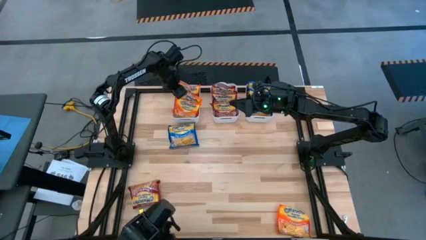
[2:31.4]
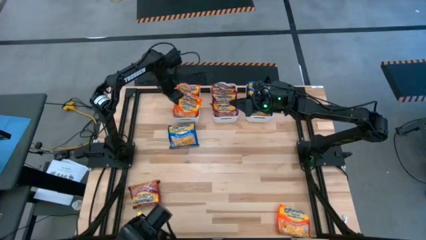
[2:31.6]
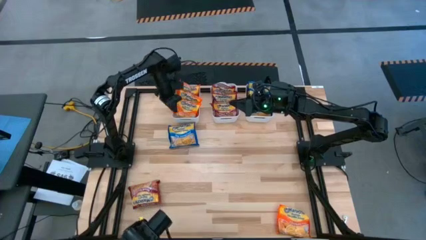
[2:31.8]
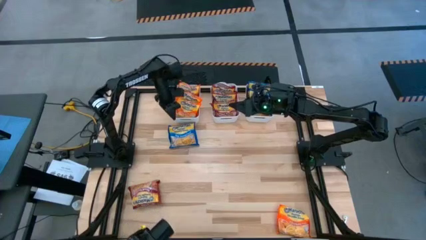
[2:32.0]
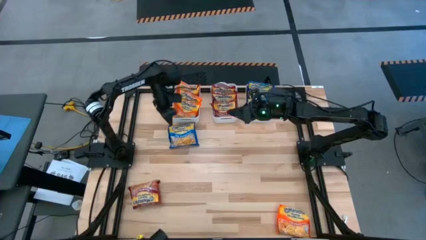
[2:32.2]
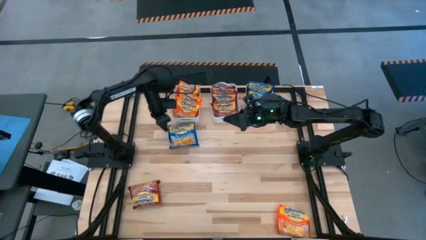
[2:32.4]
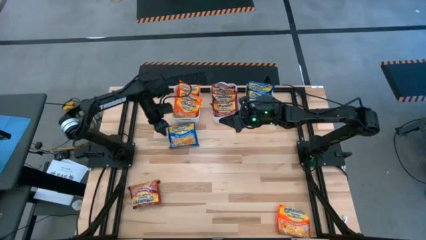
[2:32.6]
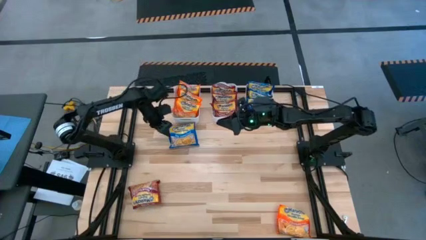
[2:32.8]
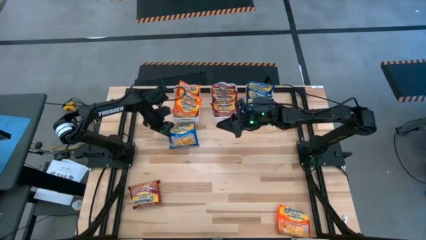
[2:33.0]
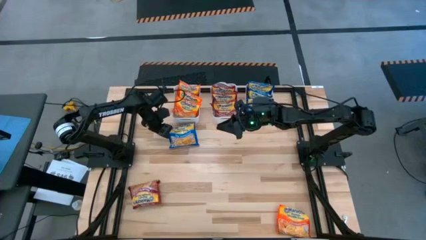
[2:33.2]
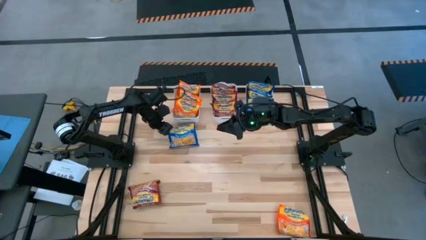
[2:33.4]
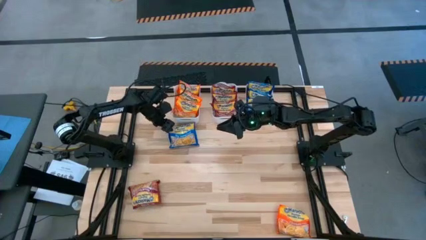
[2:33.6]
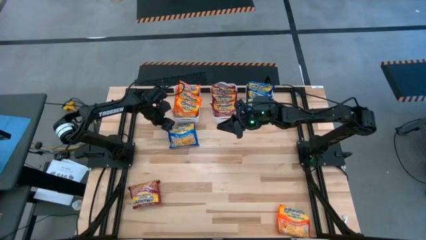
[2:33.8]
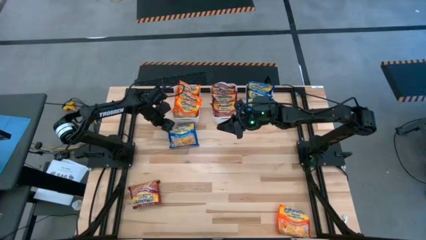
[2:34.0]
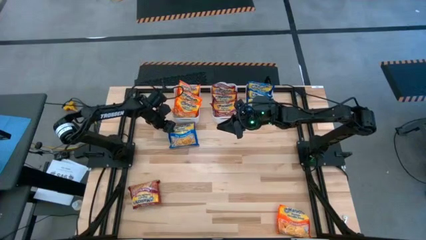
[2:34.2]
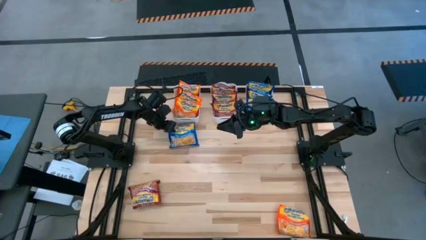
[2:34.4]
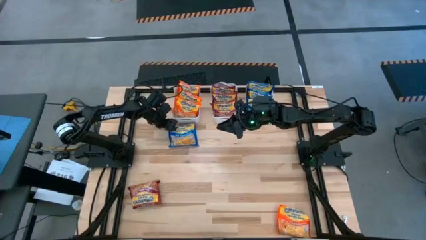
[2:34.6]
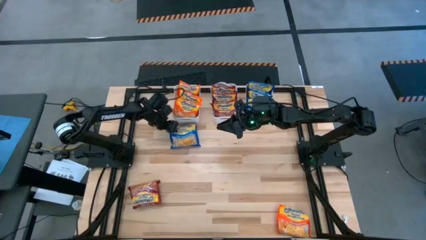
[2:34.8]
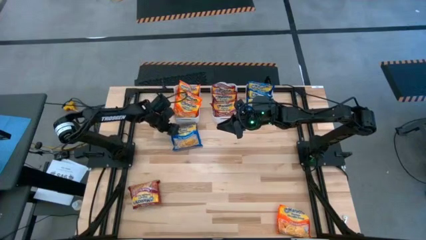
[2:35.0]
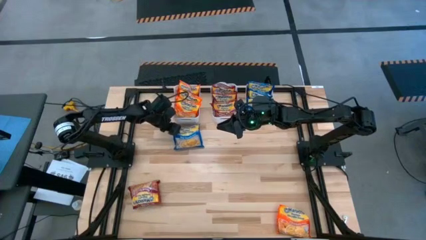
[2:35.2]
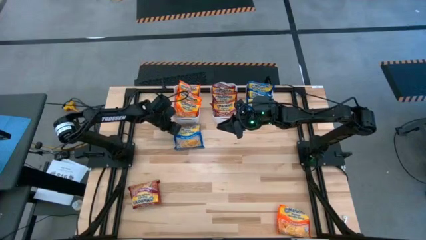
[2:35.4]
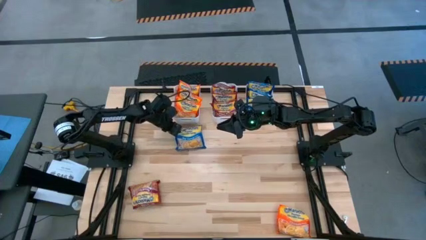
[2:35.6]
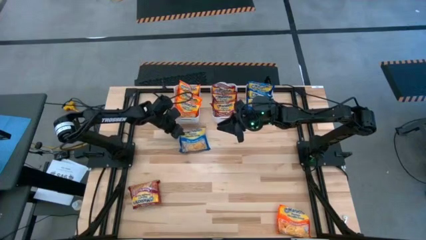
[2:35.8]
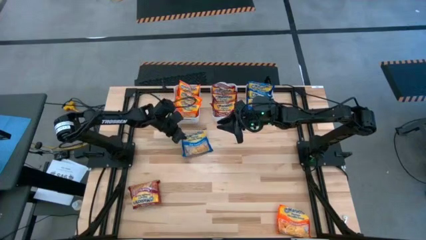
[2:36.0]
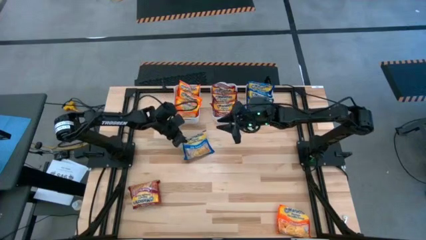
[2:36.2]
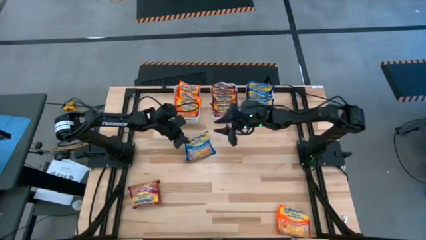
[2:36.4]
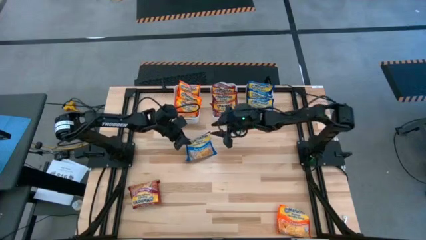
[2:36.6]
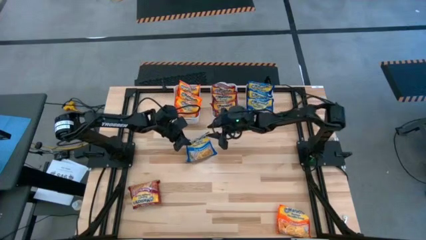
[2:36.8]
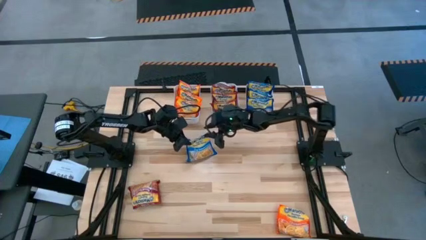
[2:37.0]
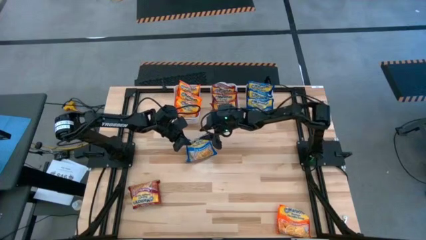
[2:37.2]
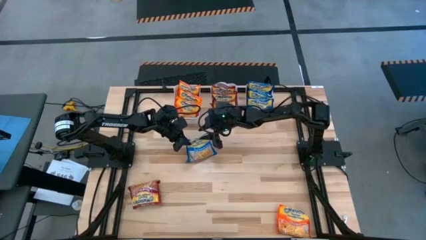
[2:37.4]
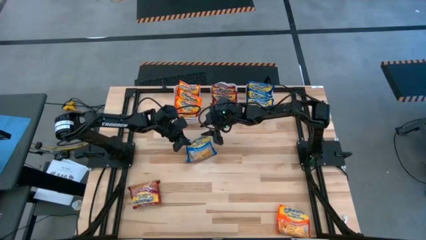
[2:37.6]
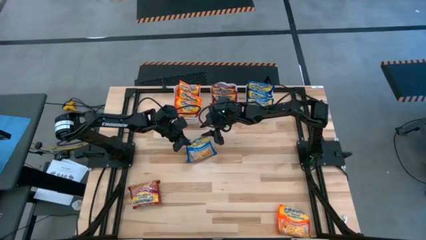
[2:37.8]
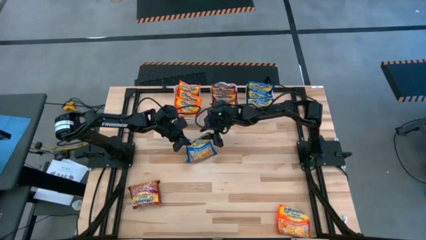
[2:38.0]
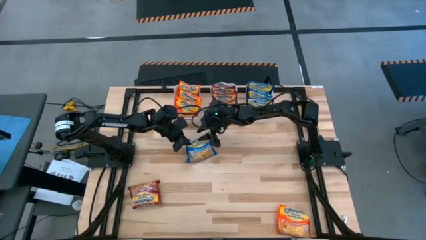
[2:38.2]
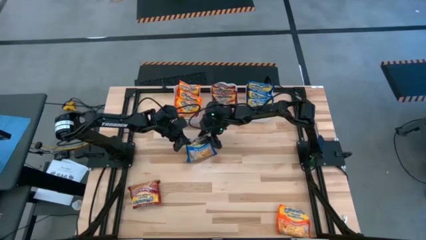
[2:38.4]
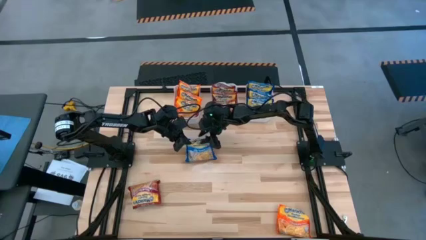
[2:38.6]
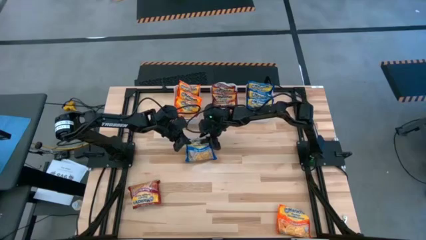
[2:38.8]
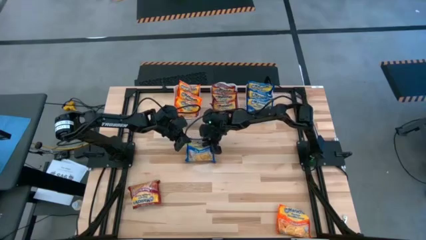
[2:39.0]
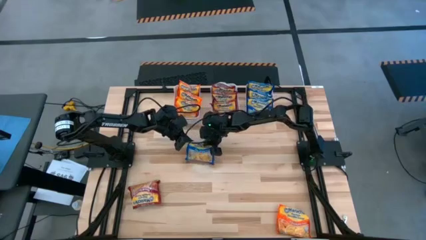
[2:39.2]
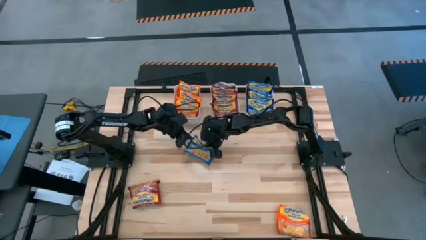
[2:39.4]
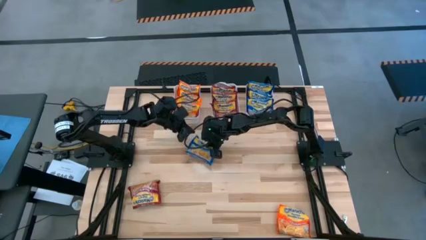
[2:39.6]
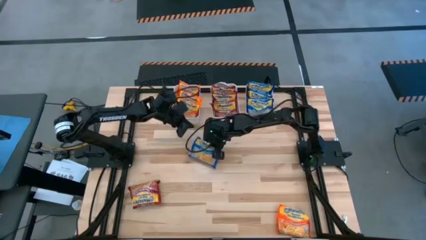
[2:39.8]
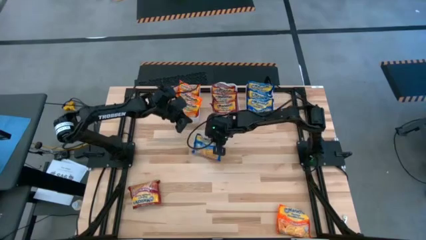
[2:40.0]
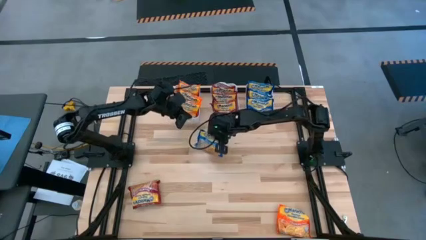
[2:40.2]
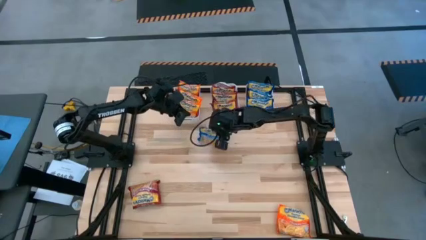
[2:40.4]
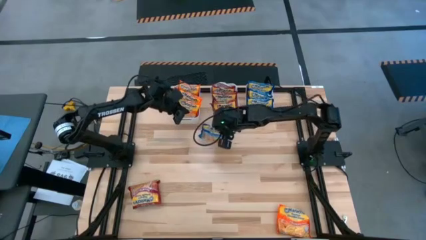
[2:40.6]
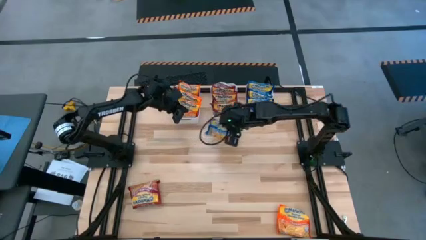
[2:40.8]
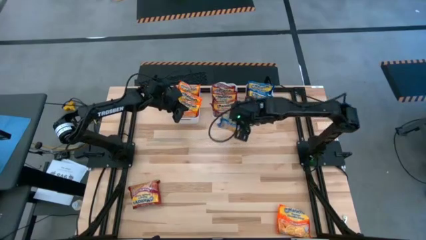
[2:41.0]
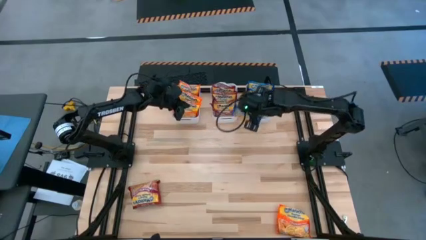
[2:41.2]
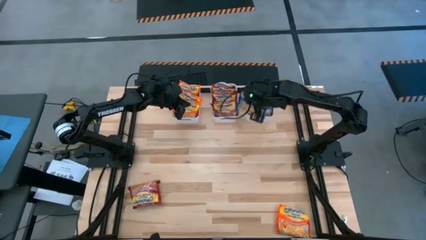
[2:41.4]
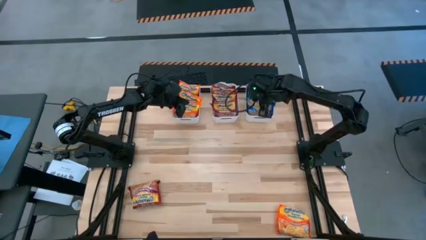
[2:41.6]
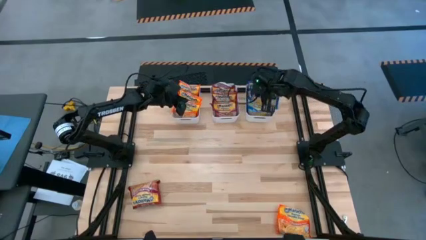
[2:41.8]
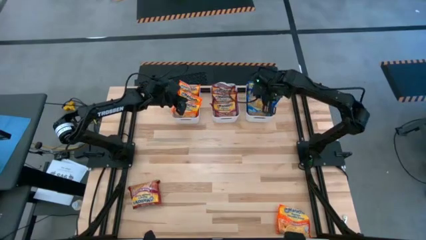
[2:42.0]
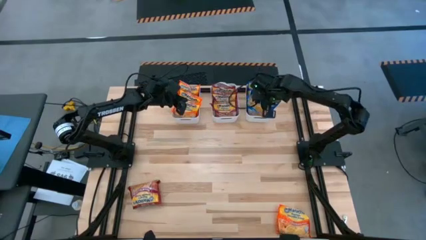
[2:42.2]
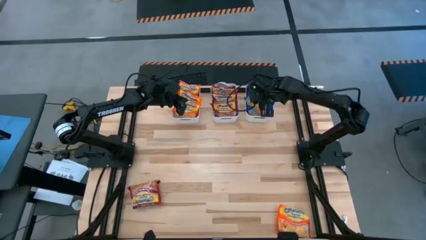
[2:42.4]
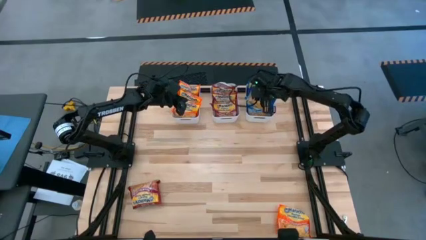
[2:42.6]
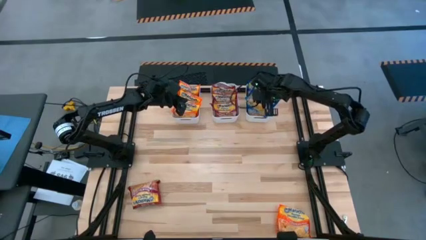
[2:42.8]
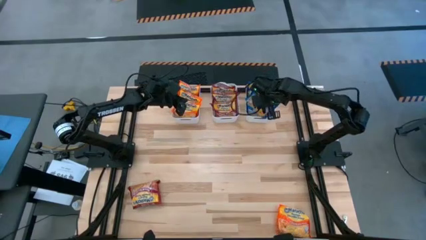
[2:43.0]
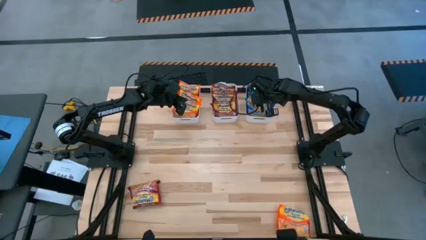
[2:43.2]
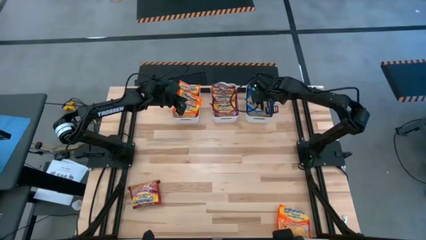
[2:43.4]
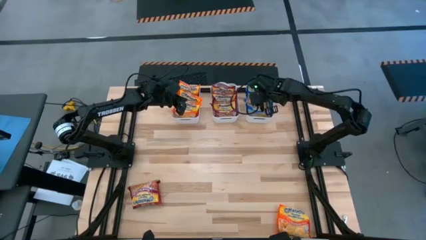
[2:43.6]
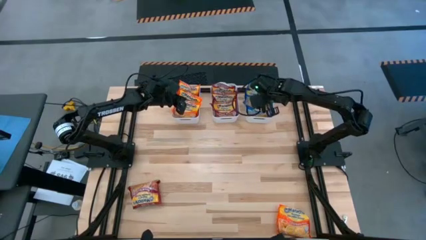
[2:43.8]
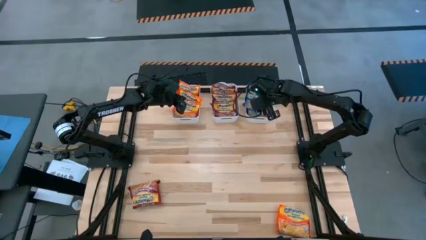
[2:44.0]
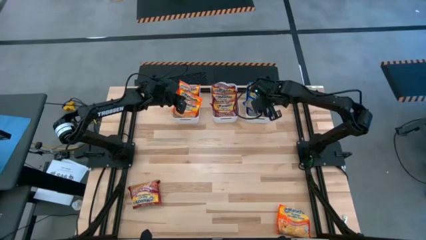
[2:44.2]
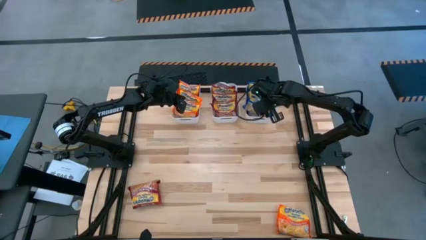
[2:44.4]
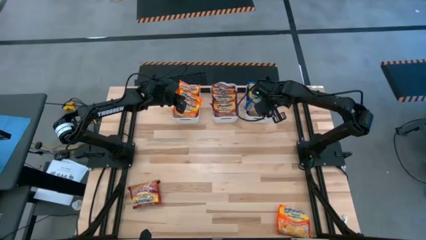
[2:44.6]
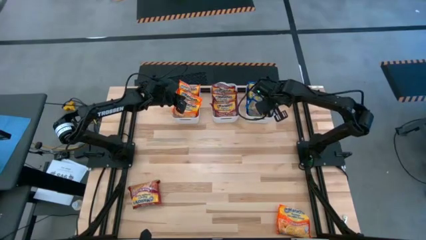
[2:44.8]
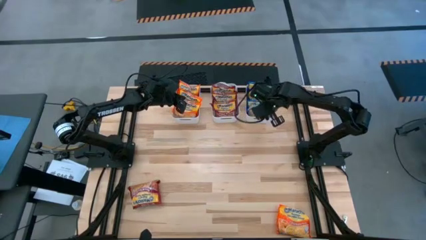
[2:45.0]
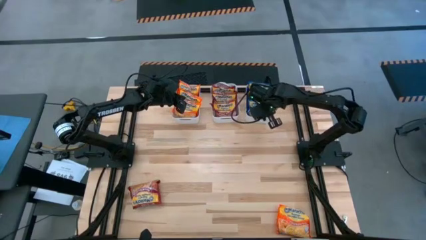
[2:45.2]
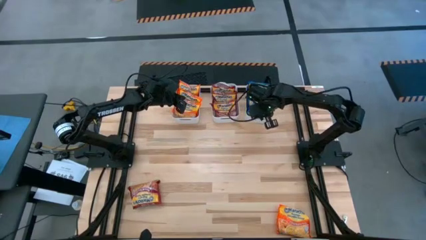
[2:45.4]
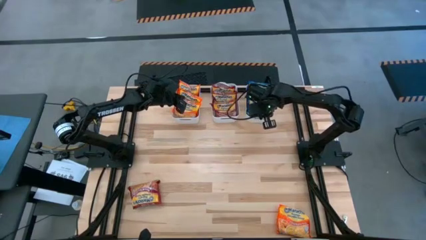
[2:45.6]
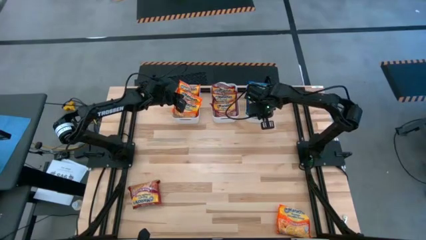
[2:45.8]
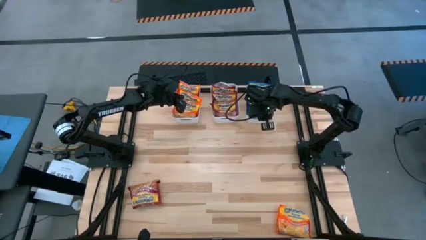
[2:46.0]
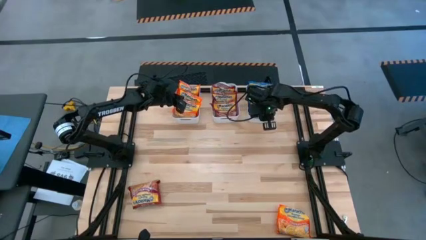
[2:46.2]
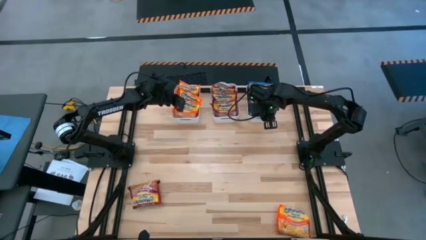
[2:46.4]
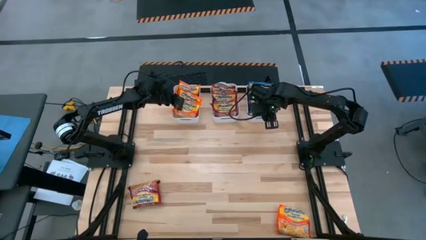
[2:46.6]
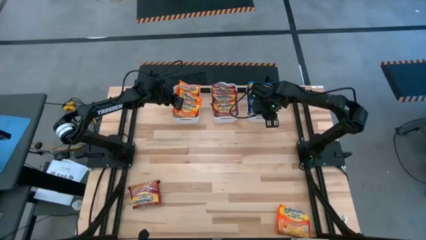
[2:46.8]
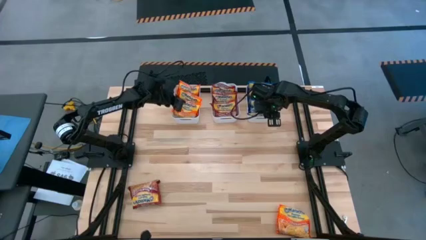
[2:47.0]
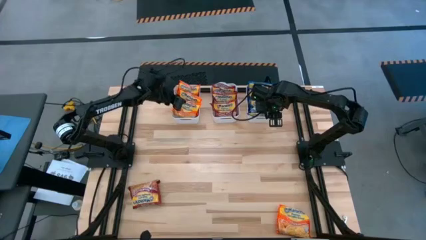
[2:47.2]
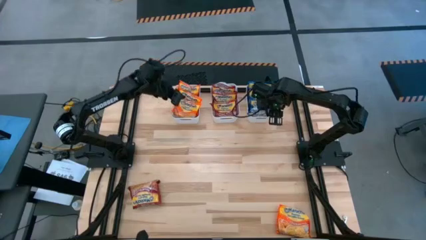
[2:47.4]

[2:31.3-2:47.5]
Task: Sort Maruchan noodles
Put the blue noodle pack into the right white bin

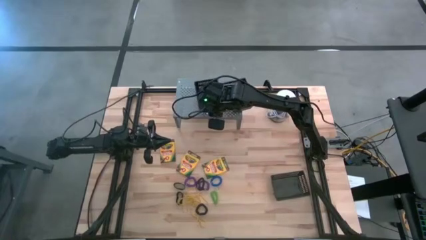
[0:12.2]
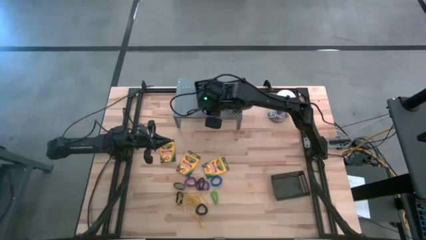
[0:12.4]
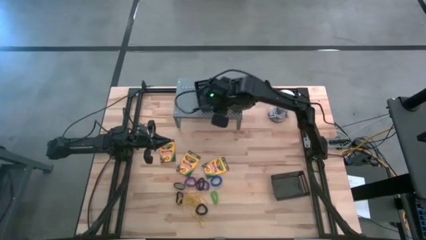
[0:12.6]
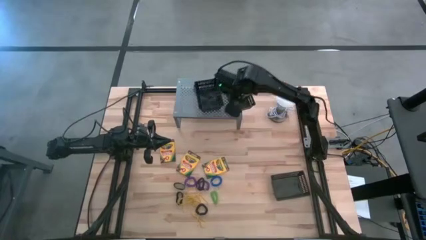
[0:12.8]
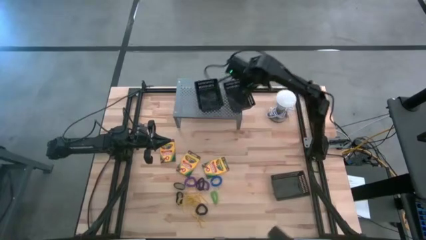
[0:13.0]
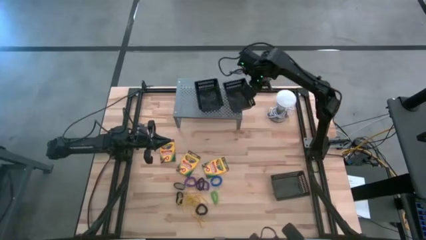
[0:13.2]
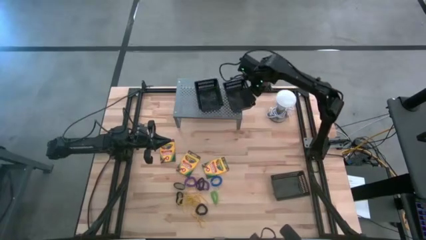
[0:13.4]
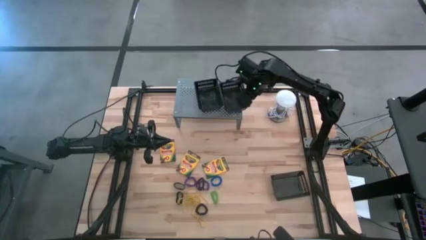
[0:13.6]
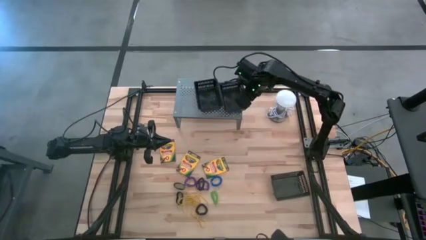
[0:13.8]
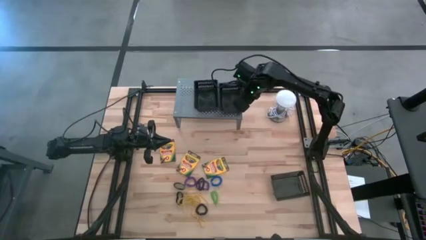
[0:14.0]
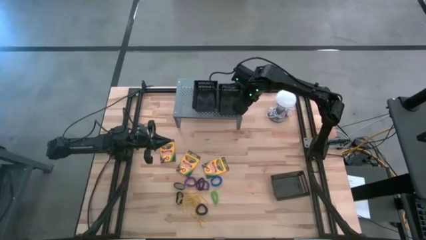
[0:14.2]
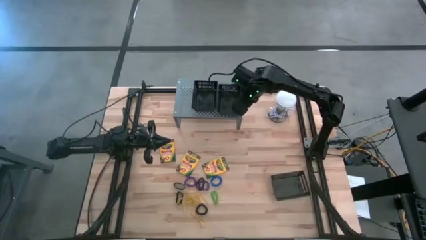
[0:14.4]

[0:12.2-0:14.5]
Task: Pick & Place Office Desk Supplies
Adjust the right black bin on the shelf
